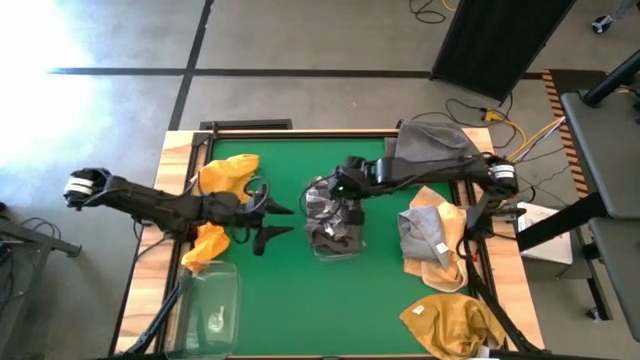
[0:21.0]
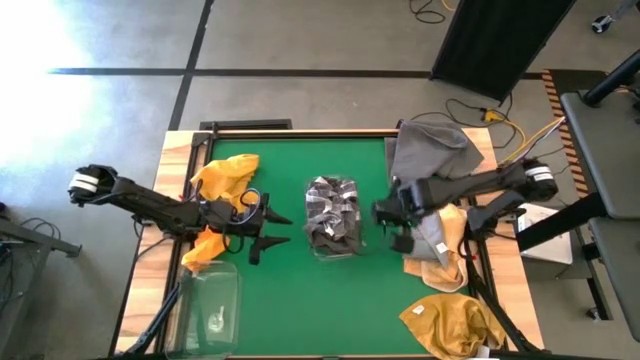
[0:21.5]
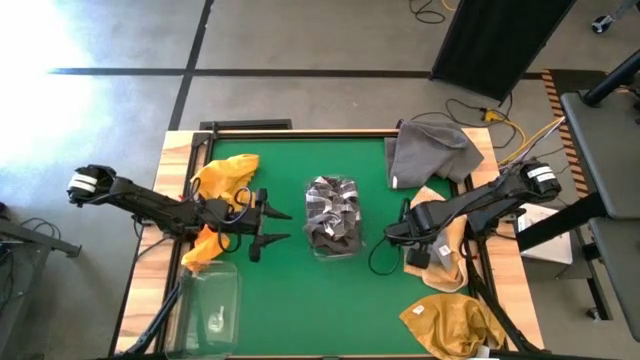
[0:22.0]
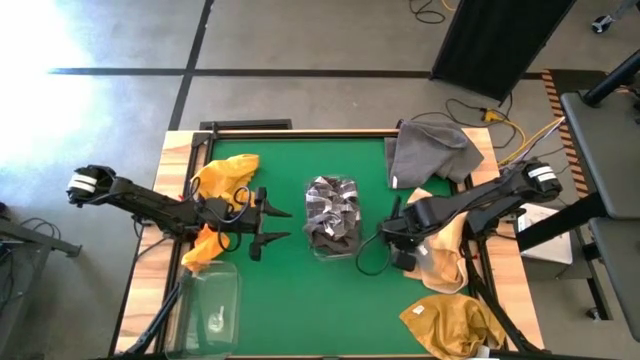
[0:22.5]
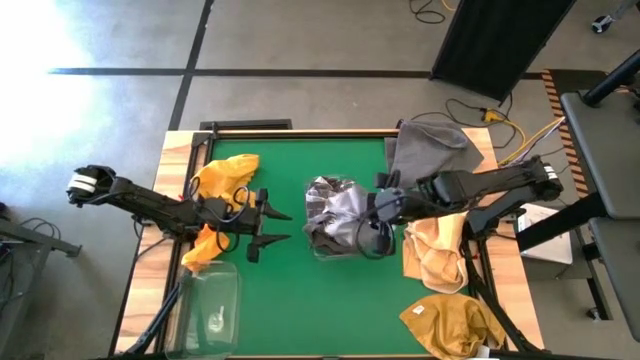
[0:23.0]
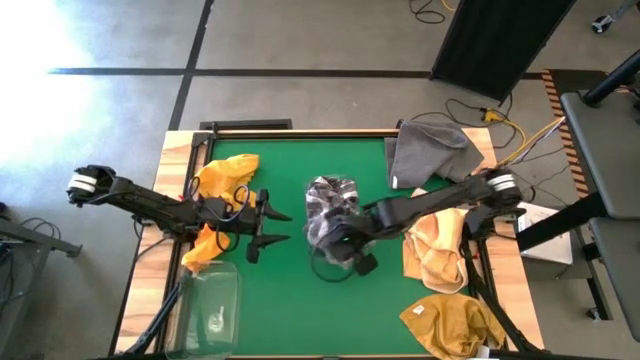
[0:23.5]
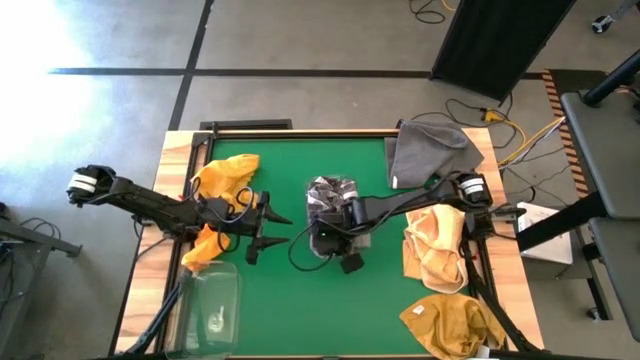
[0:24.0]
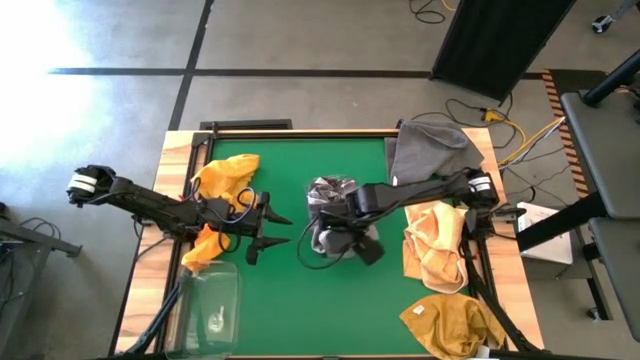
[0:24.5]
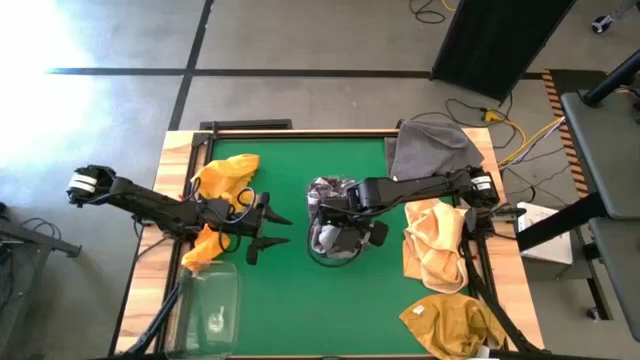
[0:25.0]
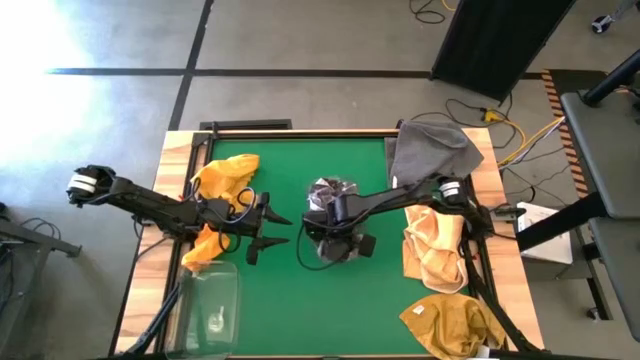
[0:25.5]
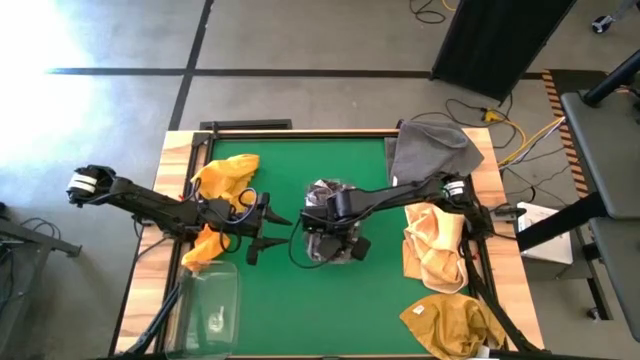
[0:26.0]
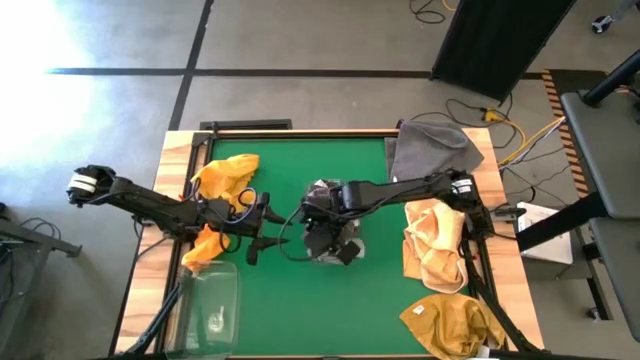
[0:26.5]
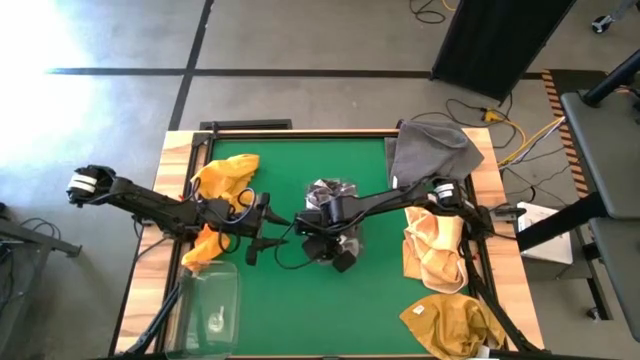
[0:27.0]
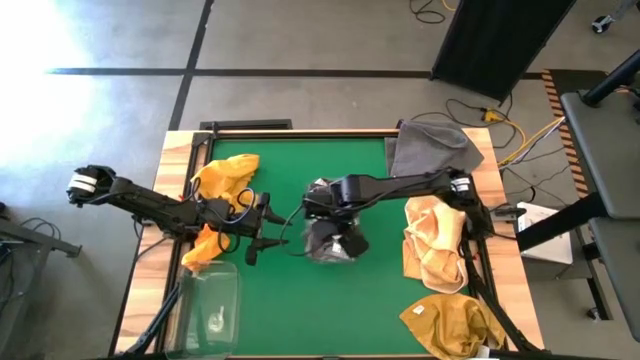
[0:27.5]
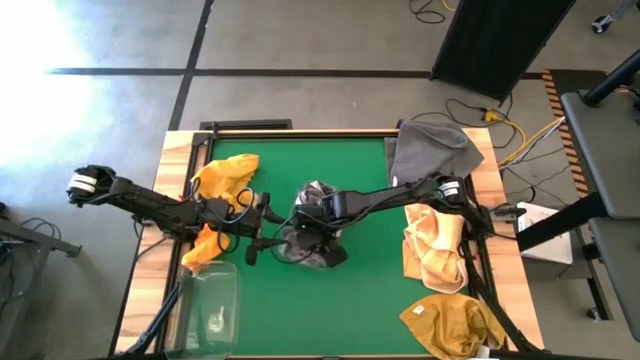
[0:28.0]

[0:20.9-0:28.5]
Task: Sort towels by color in basket
Put the light gray towel into the top transparent bin

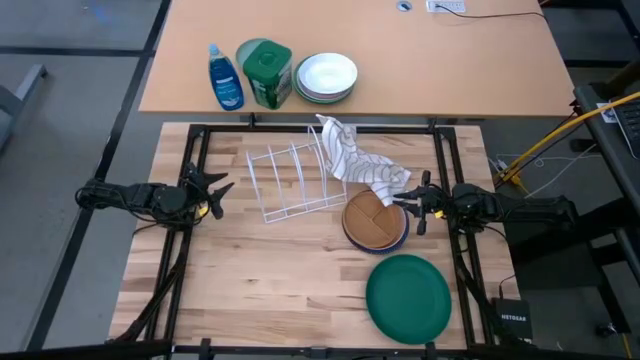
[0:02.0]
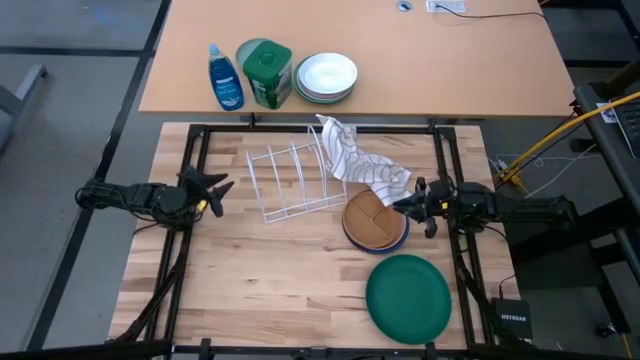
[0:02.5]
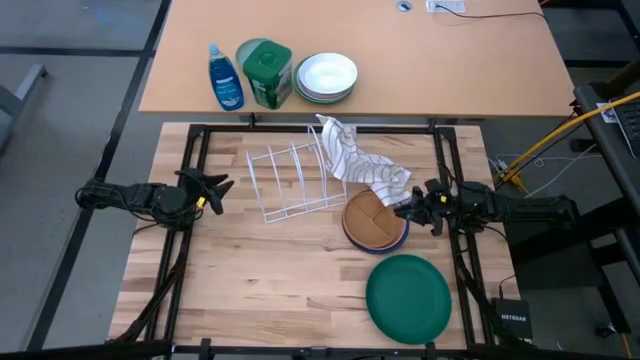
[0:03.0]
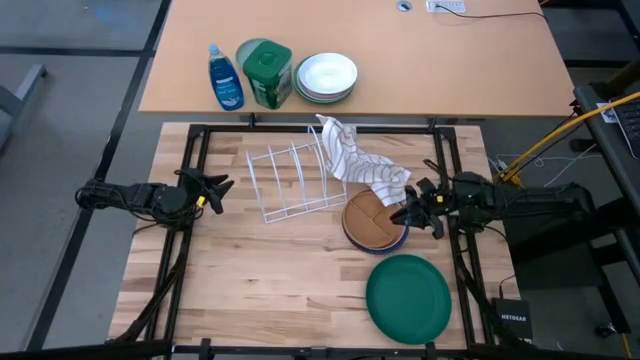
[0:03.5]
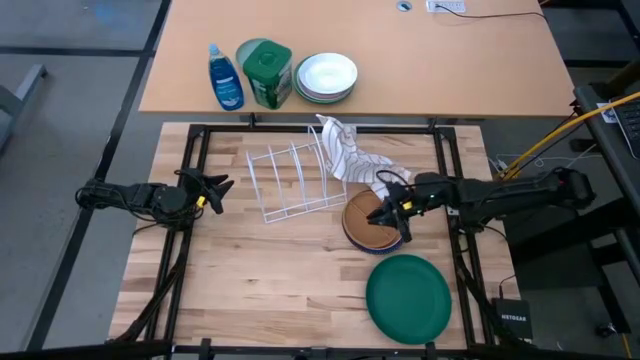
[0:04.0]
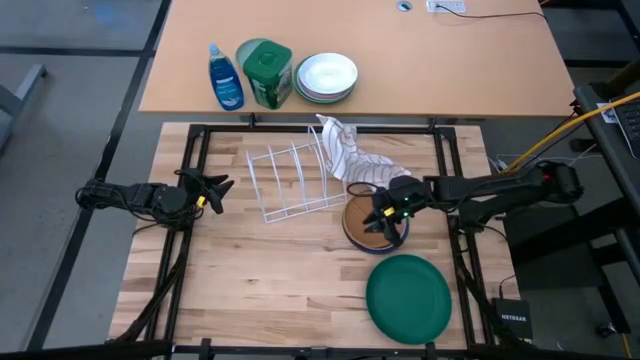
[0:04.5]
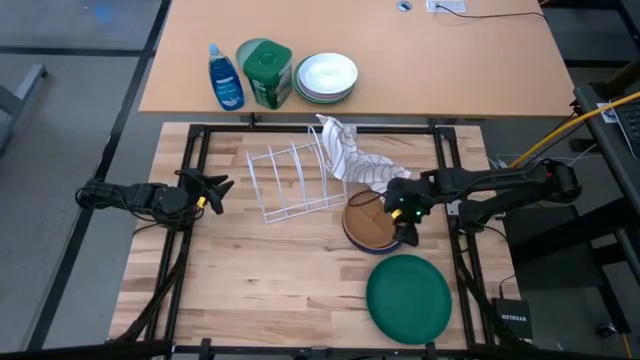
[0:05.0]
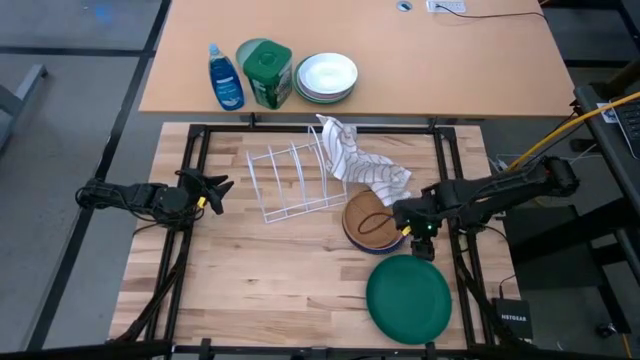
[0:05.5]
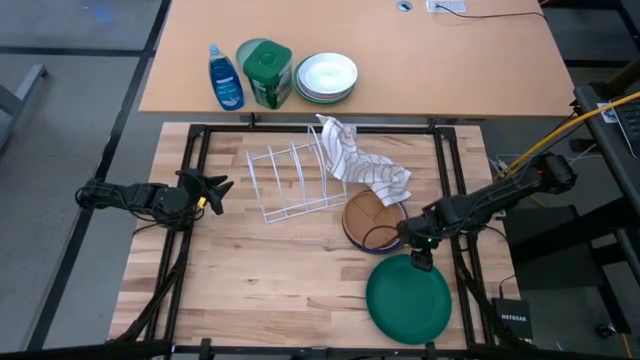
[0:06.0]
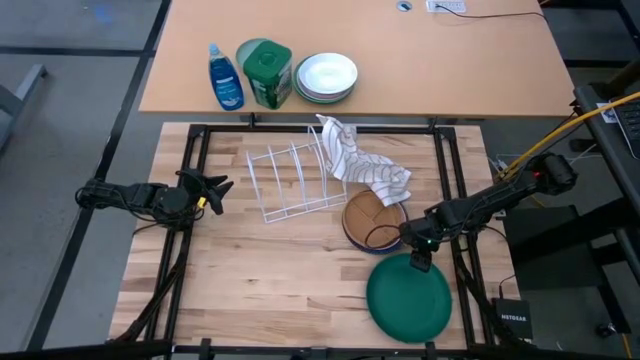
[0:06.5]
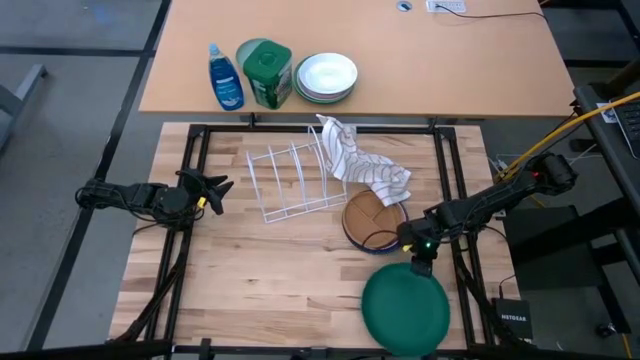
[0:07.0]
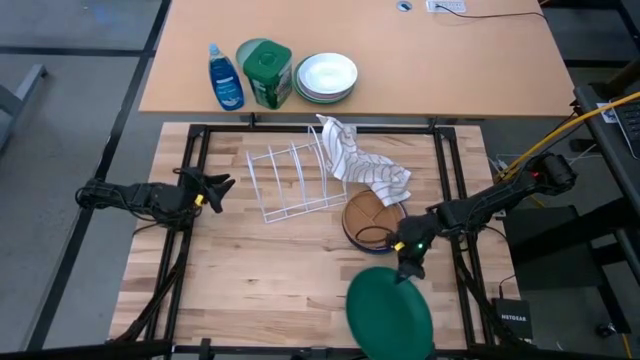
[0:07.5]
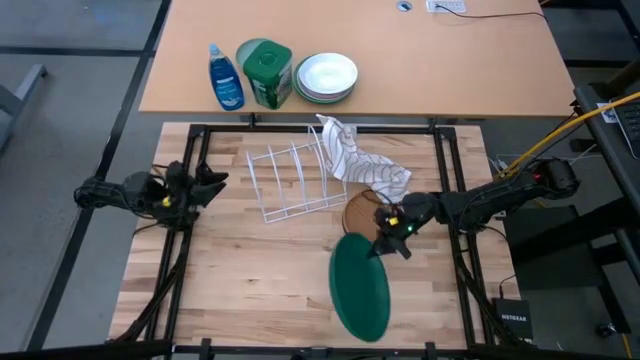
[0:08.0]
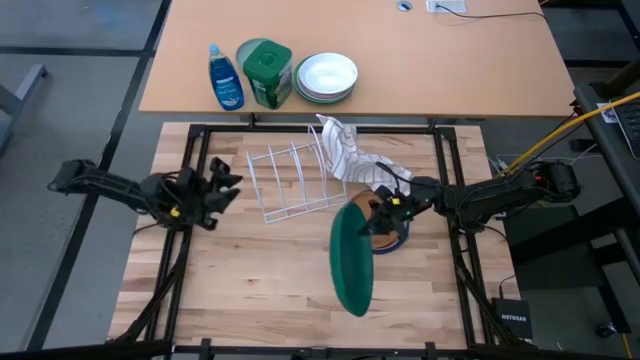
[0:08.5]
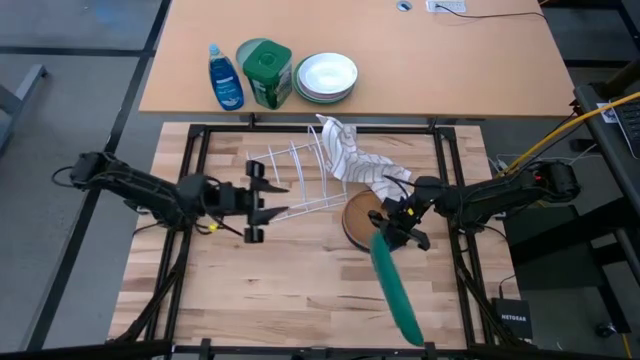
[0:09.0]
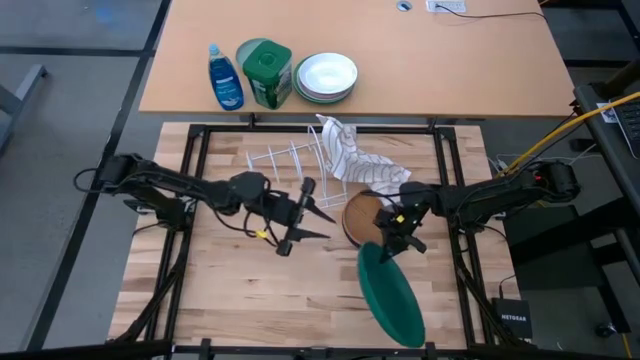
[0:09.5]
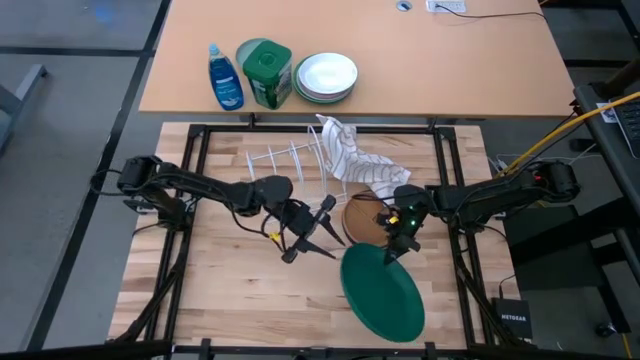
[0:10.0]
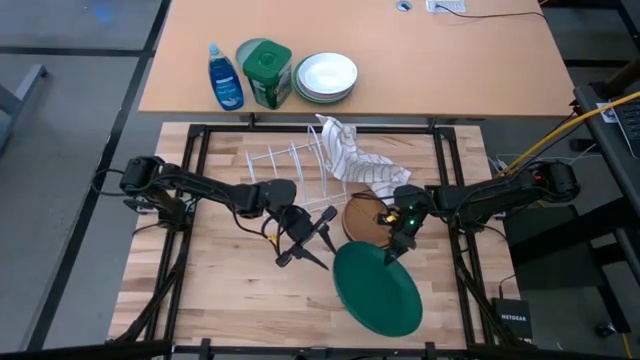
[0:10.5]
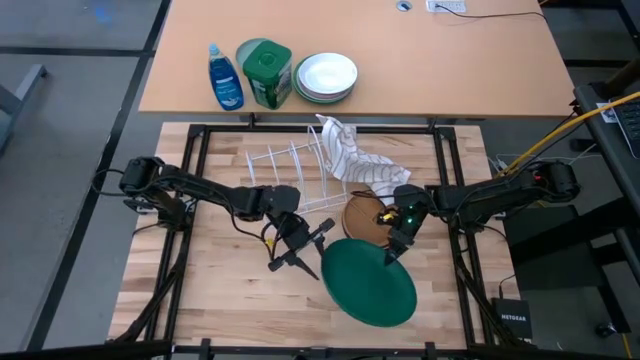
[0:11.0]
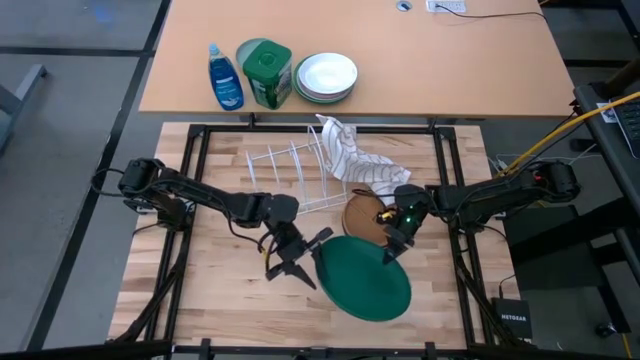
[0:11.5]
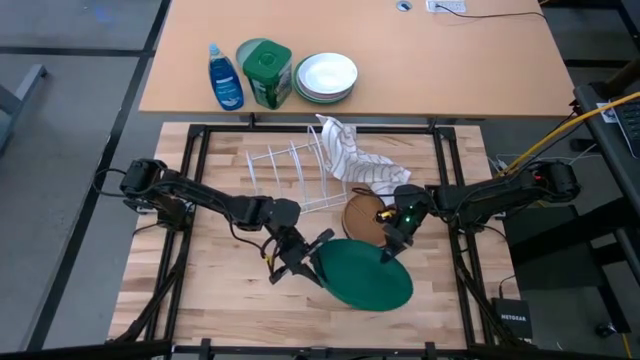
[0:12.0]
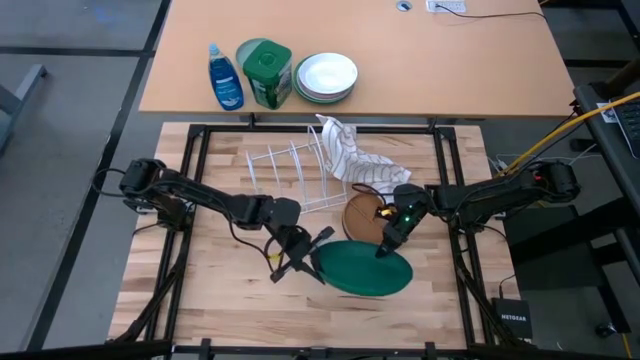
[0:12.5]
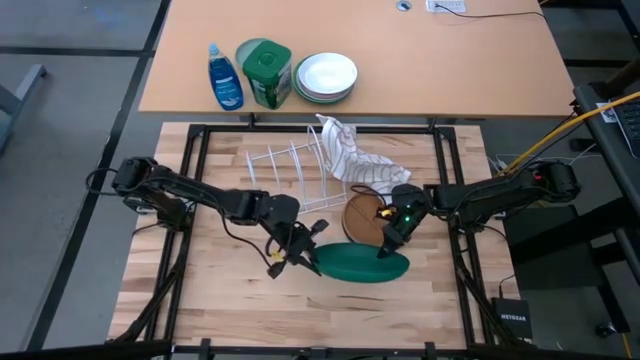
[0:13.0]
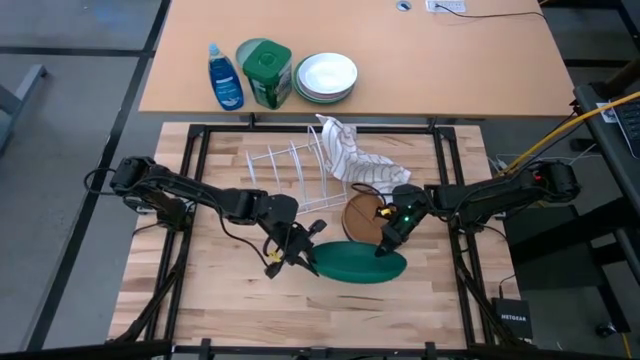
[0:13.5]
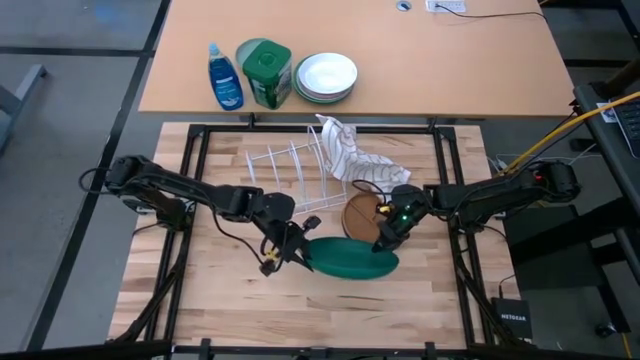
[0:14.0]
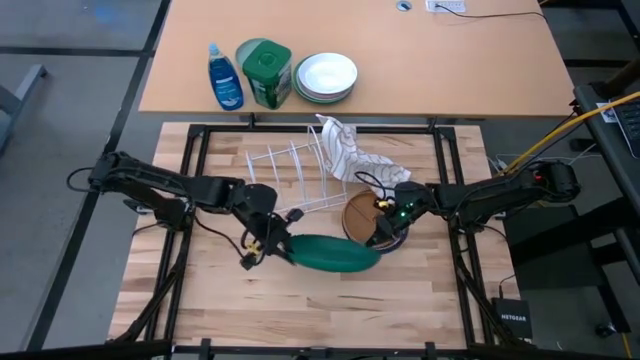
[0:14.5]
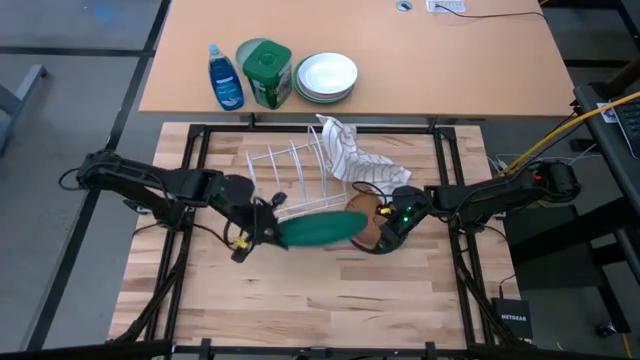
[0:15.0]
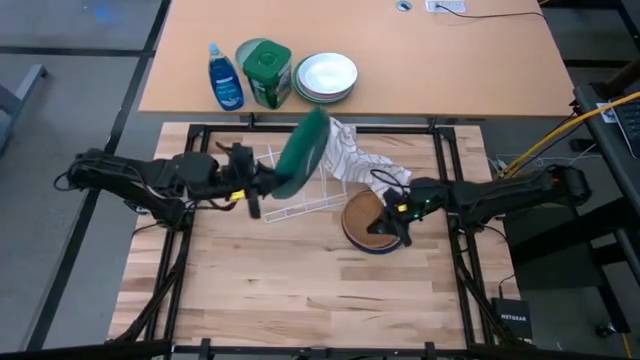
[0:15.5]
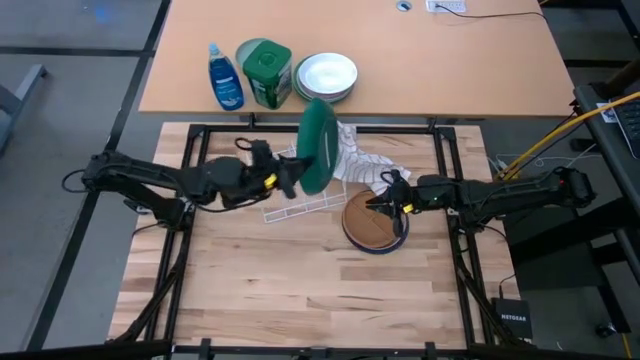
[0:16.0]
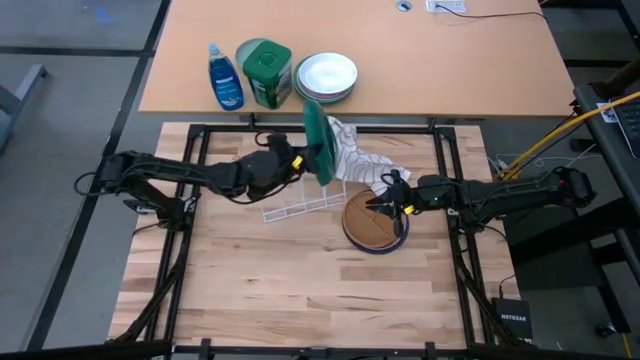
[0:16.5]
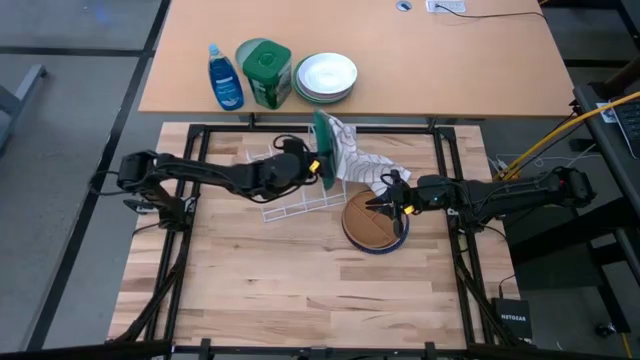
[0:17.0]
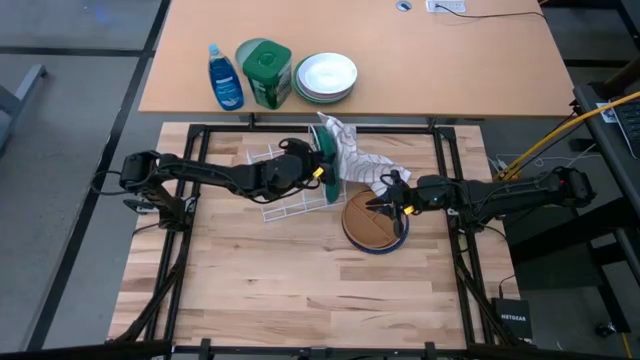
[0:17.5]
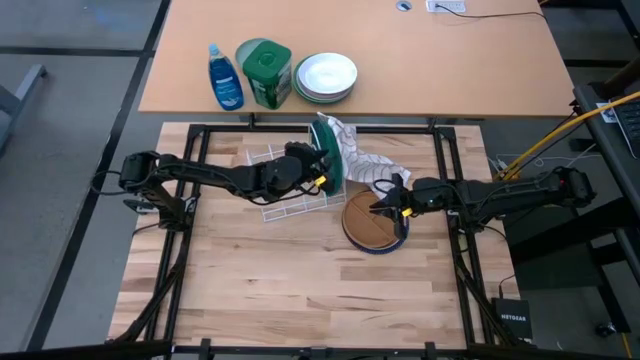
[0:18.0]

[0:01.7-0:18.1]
Task: Sort dishes
Put the green plate into the dish rack
